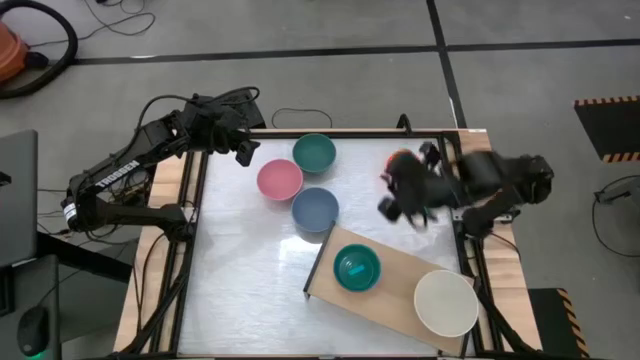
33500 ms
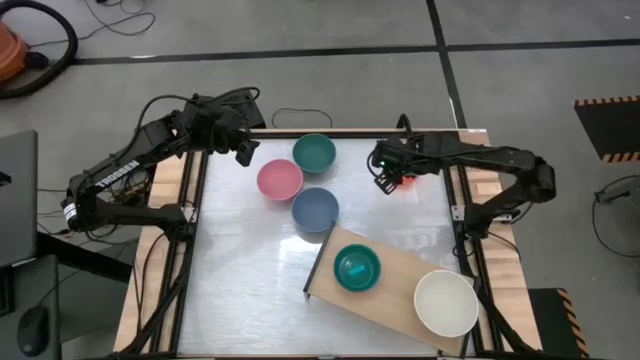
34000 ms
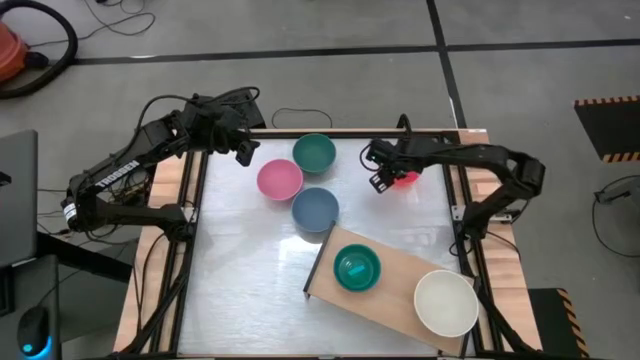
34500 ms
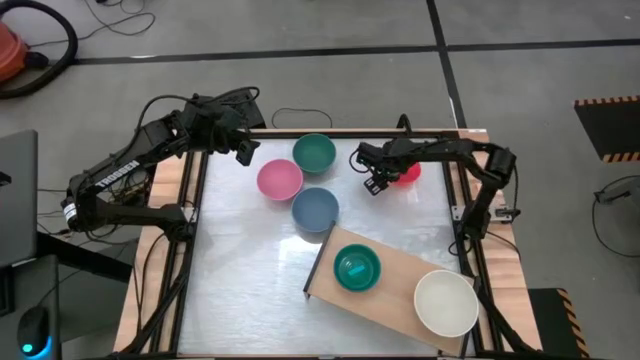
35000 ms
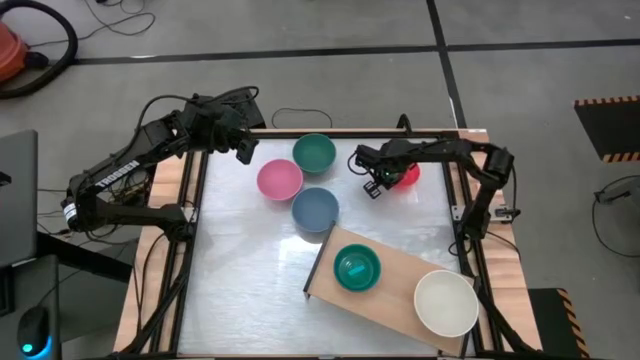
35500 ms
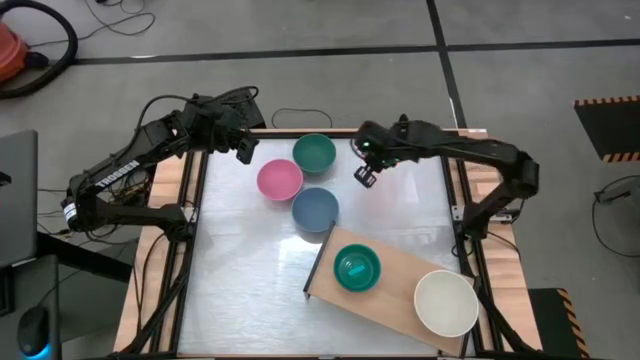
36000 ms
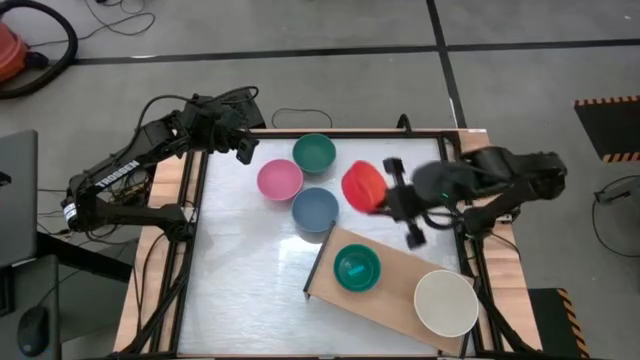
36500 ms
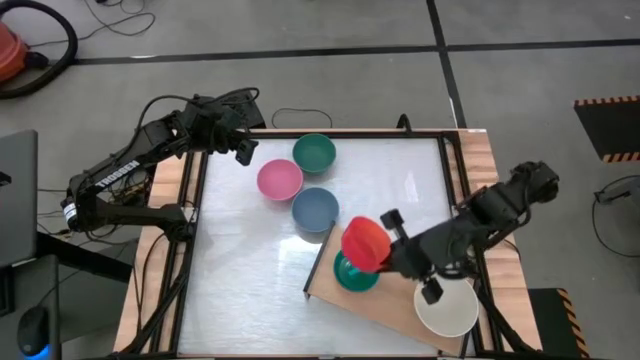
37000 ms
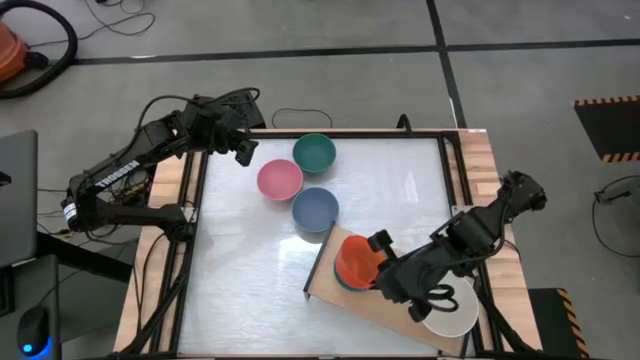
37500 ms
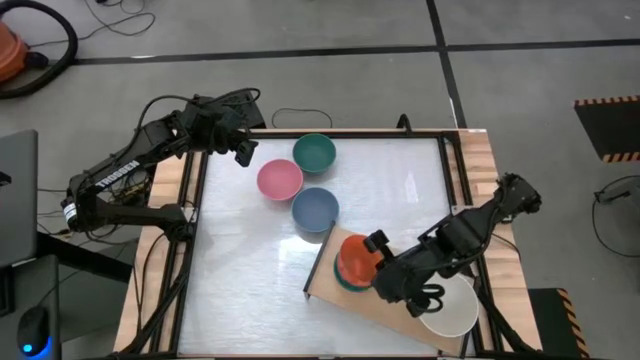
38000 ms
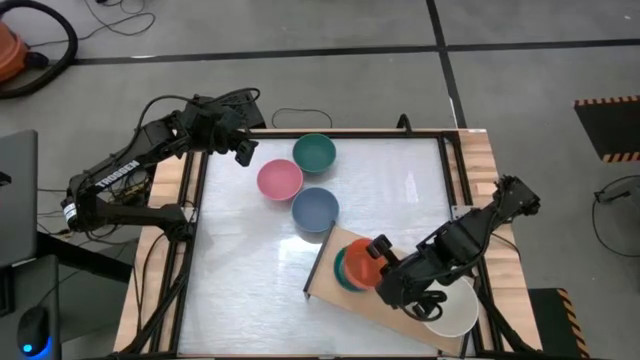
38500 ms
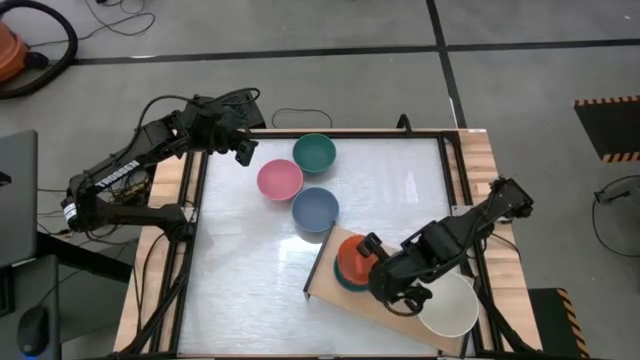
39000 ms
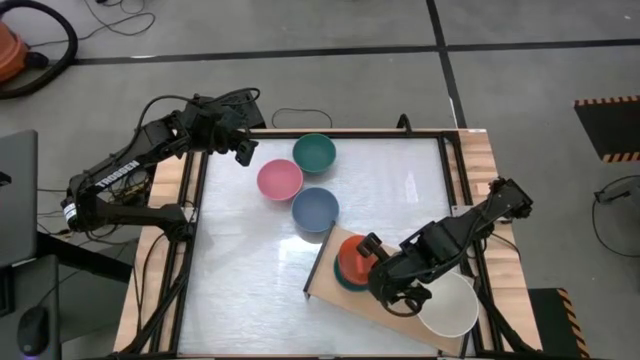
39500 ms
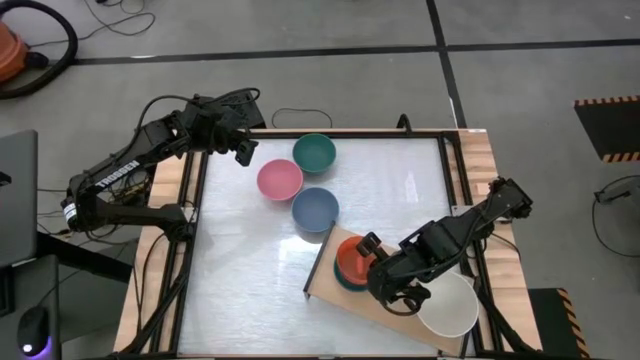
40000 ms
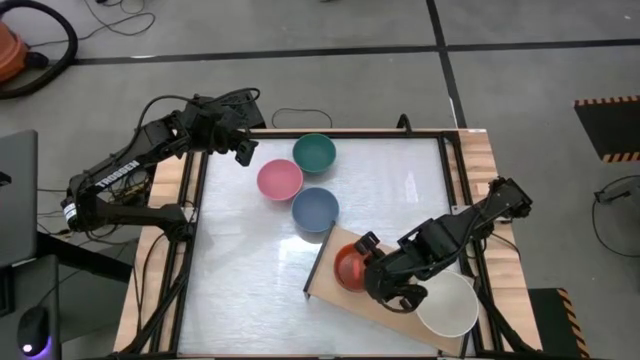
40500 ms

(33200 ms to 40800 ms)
Task: Place and stack bowls onto a shelf
Stack the transparent orange bowl on top of the transparent blue bowl on the shelf

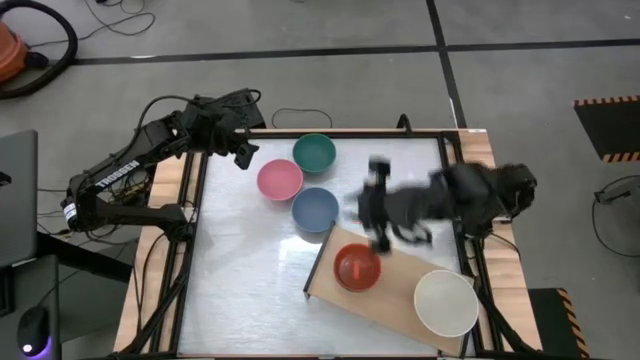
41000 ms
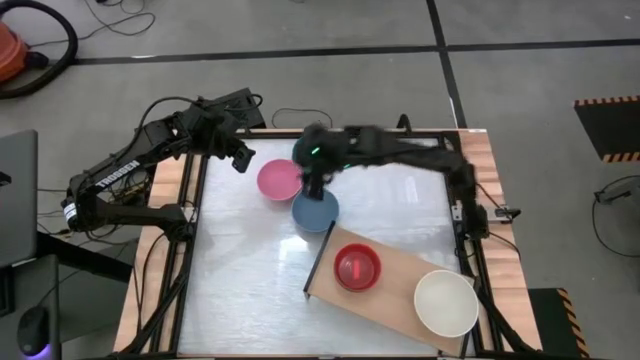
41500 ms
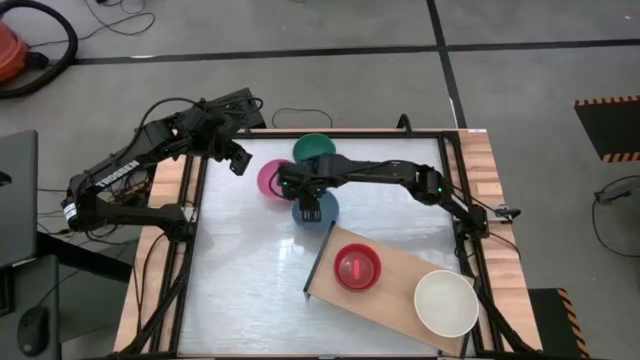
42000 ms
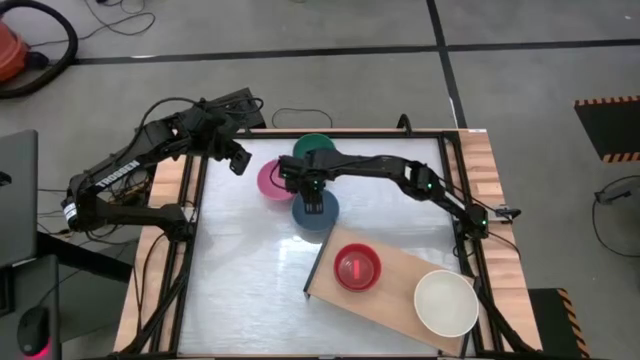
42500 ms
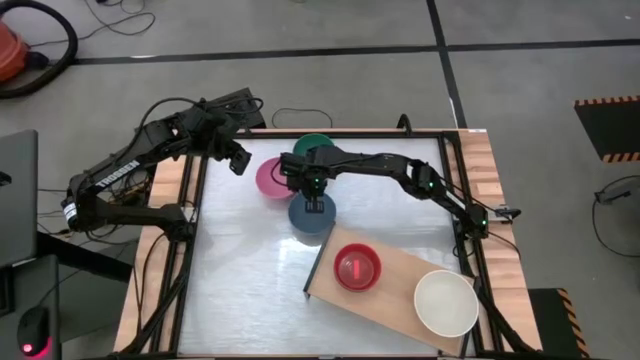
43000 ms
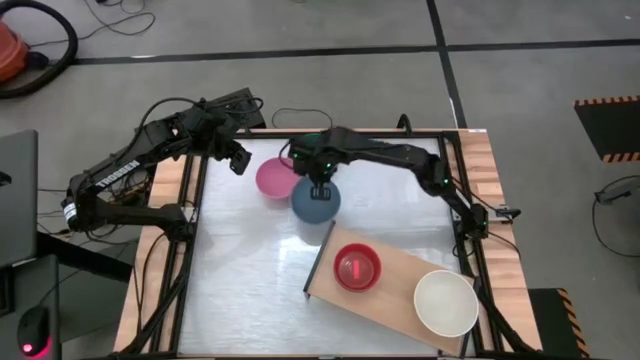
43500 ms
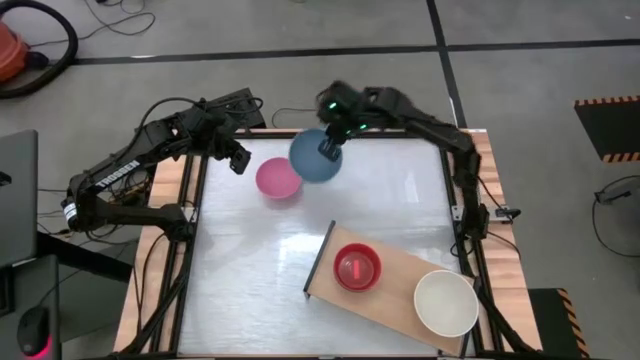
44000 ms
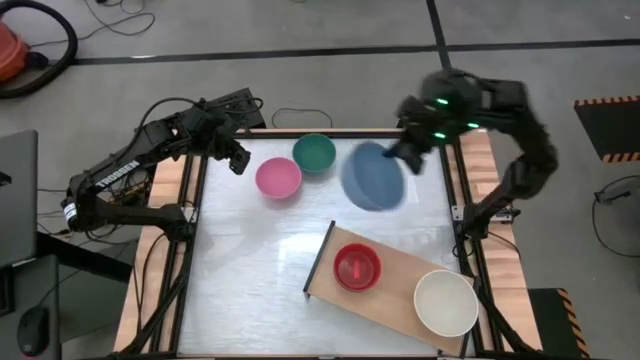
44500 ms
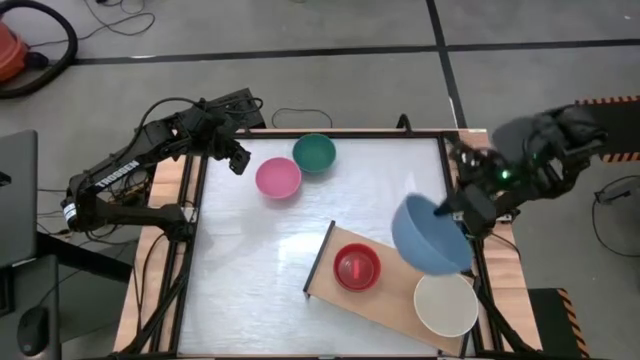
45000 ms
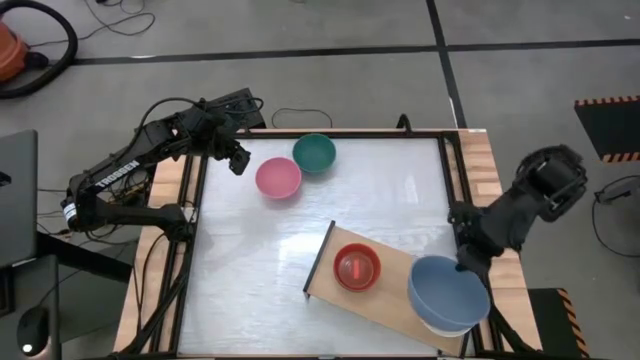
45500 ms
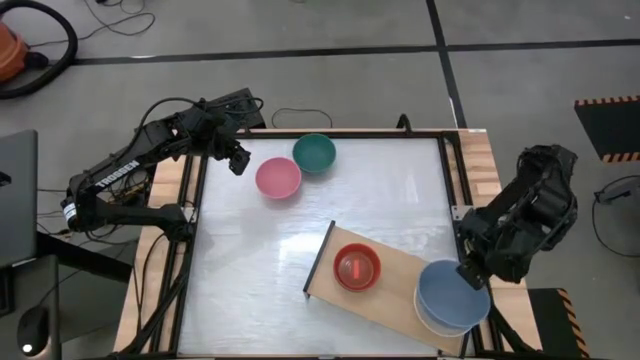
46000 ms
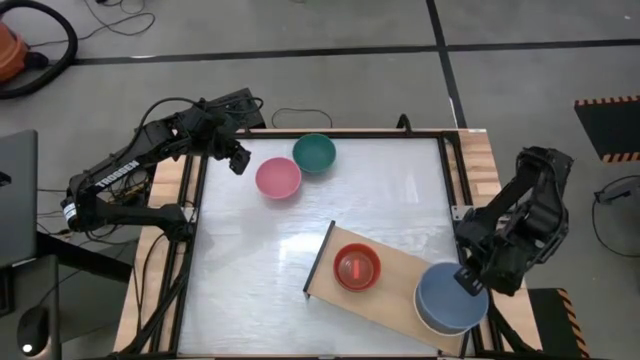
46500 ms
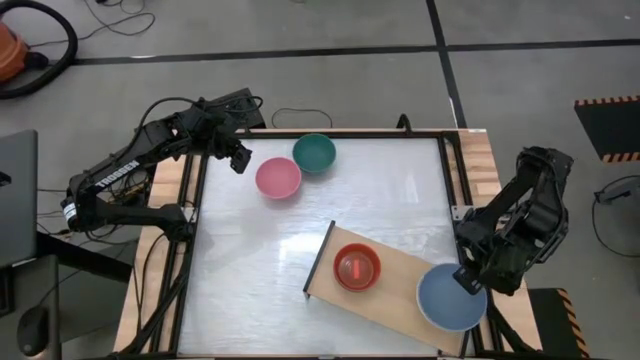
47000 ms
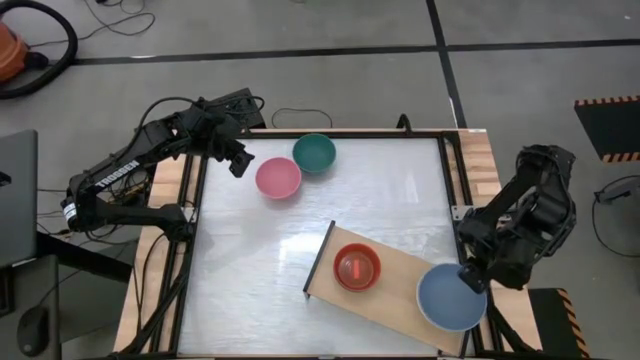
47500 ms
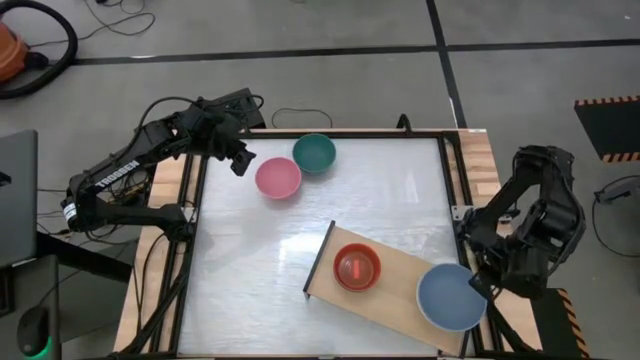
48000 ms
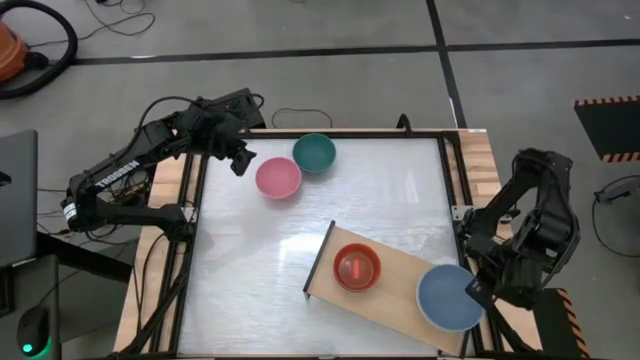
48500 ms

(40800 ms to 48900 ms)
Stack the blue bowl on top of the light gray bowl on the shelf

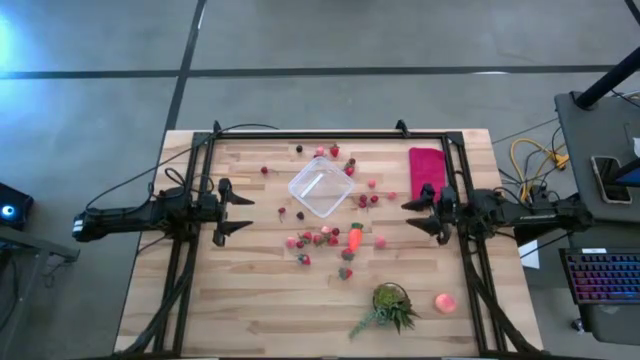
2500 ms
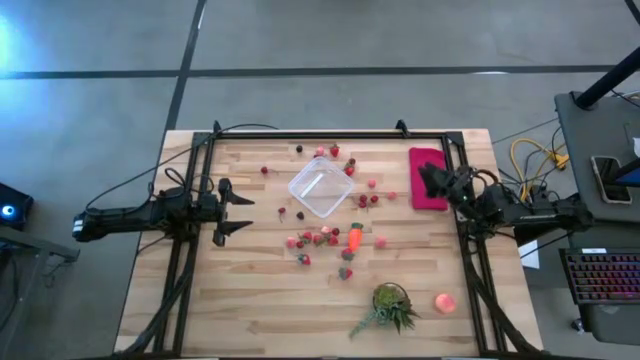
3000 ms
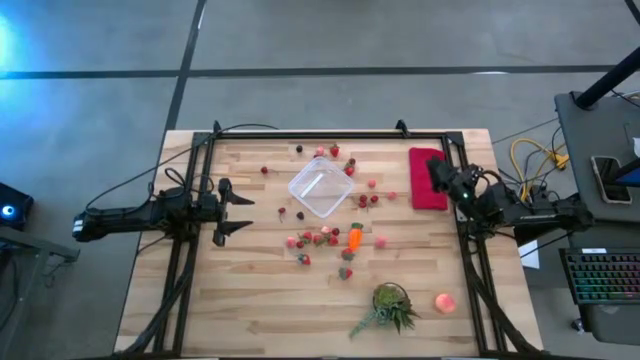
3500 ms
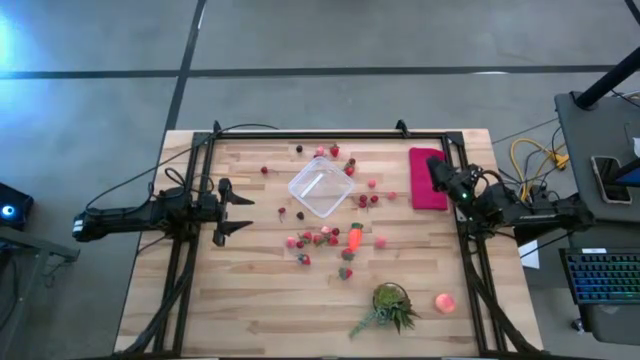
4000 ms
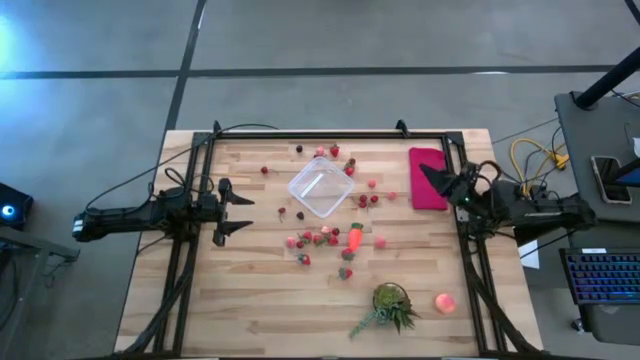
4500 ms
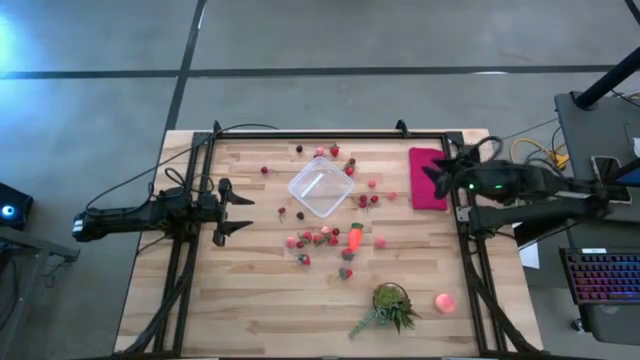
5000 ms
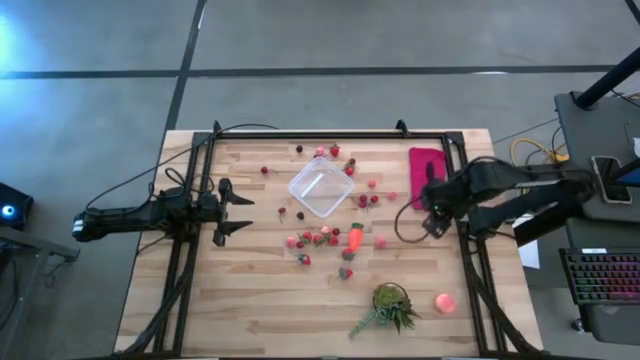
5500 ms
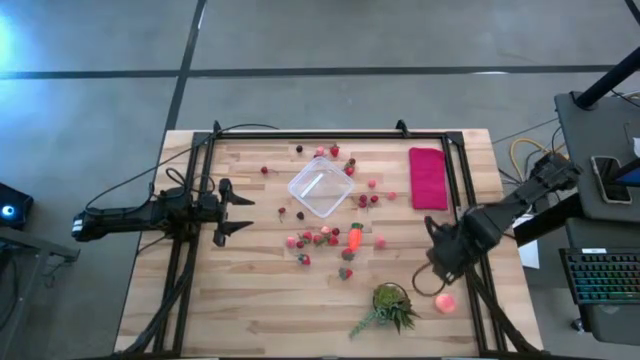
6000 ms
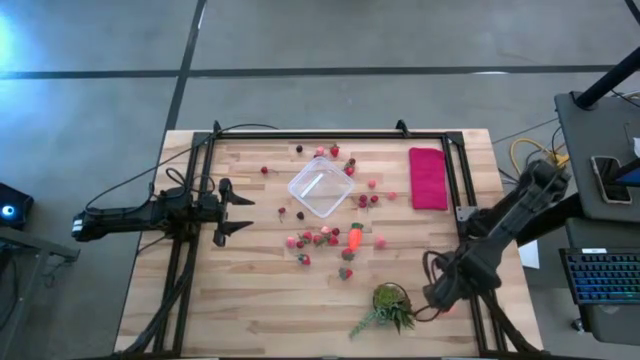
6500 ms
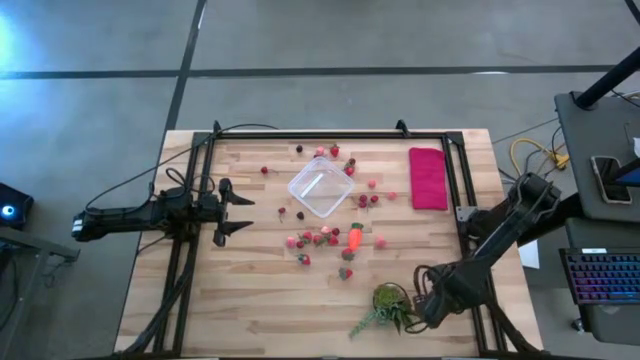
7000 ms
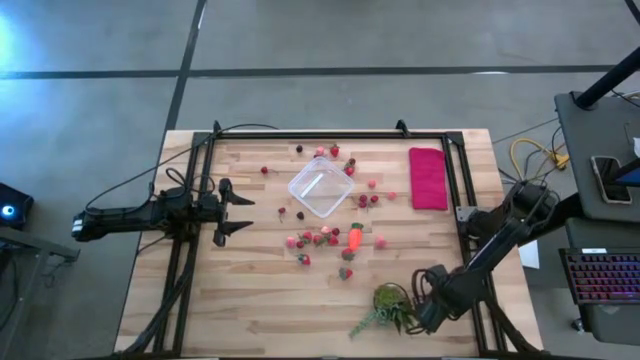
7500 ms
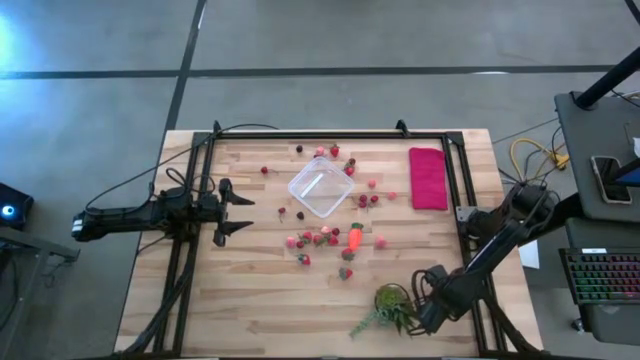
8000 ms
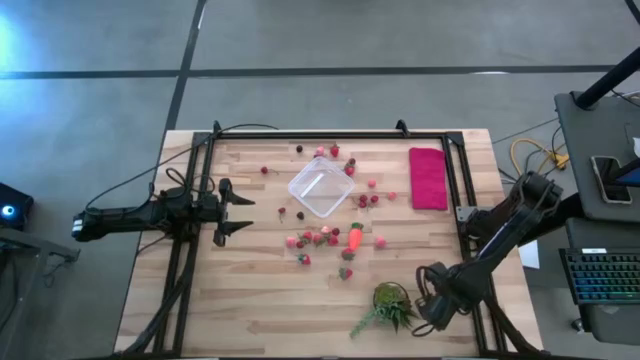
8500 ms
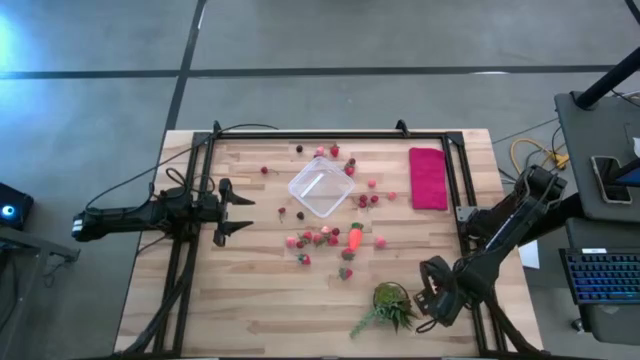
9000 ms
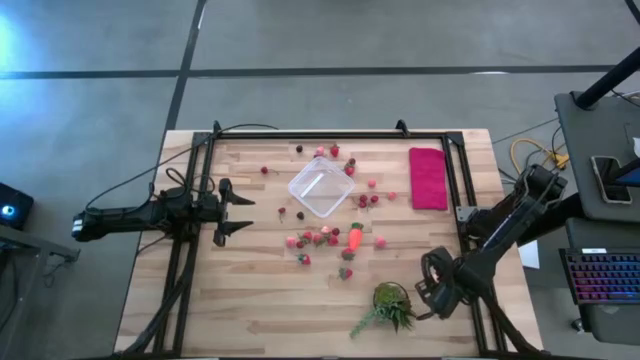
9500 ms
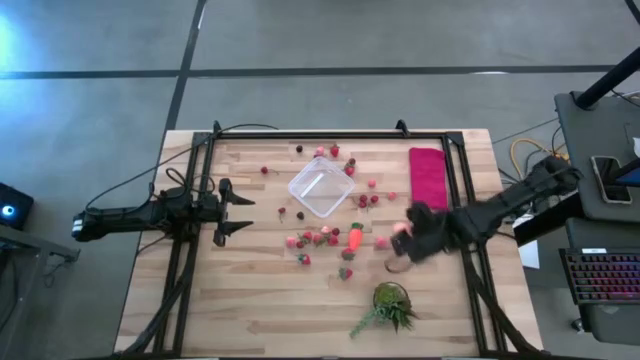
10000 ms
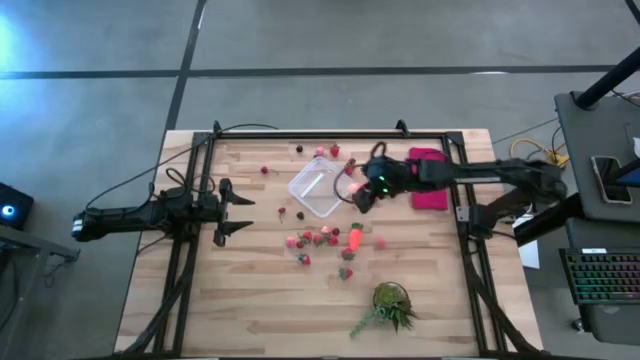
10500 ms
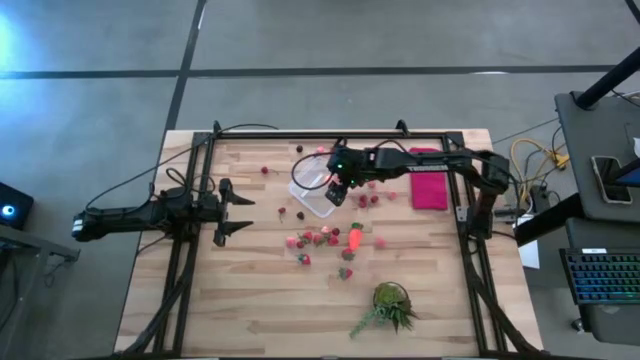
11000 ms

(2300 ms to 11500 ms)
Task: Pick and placing Produce into tupperware
Put the pink apricot into the transparent container
